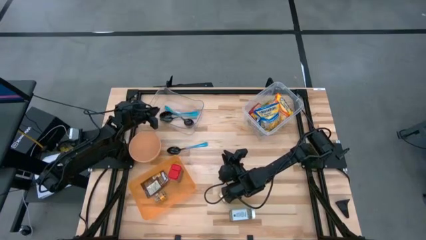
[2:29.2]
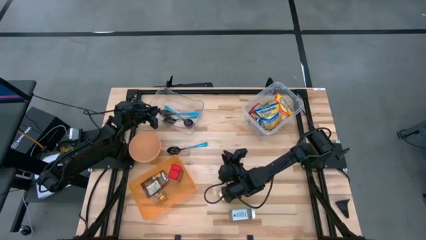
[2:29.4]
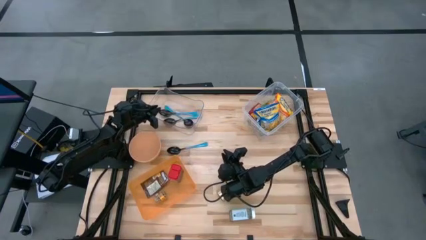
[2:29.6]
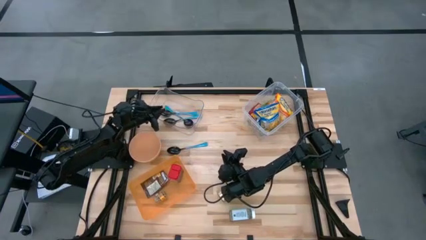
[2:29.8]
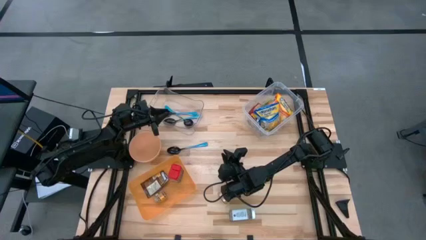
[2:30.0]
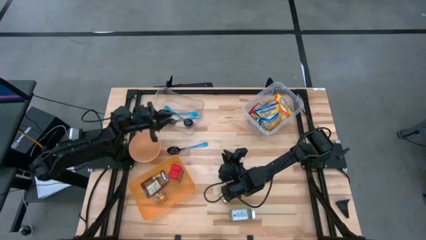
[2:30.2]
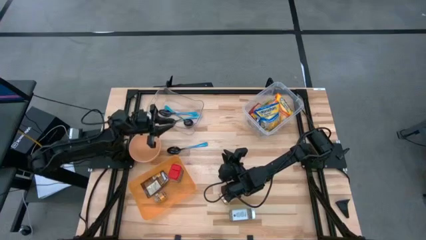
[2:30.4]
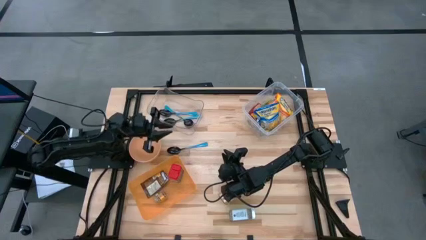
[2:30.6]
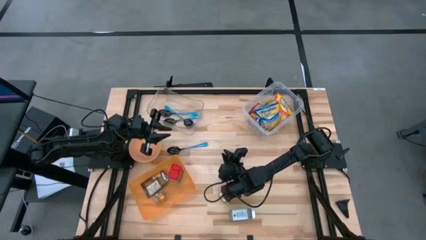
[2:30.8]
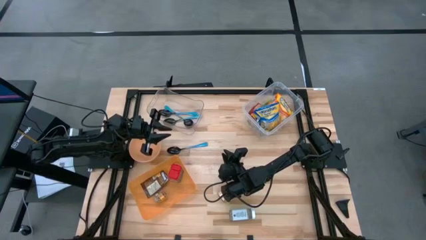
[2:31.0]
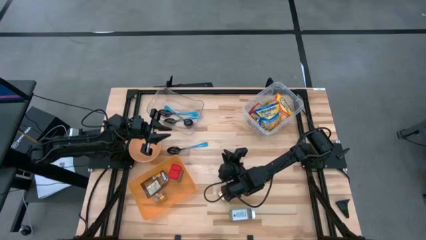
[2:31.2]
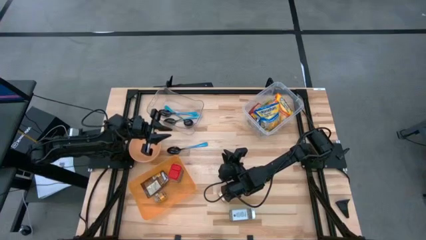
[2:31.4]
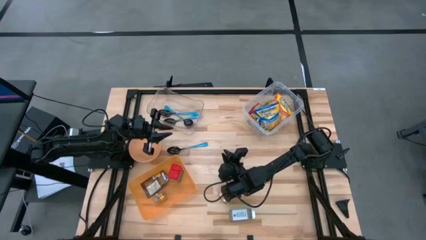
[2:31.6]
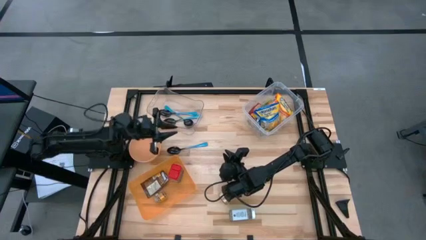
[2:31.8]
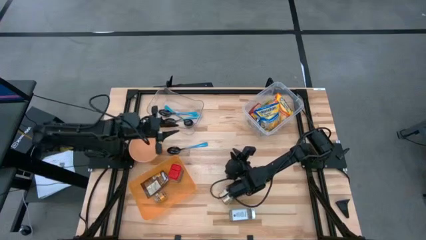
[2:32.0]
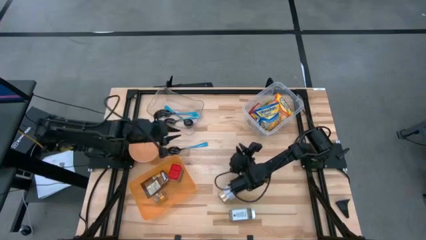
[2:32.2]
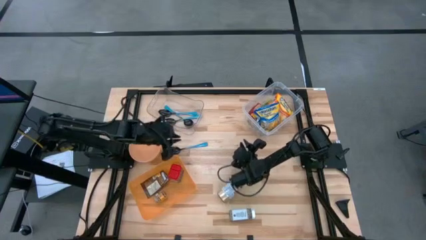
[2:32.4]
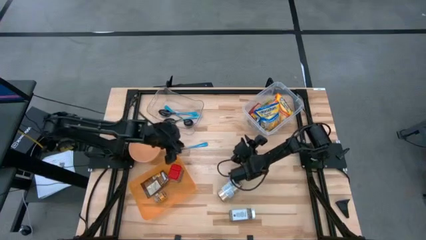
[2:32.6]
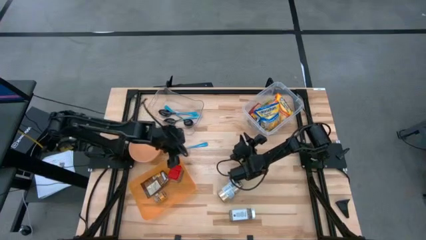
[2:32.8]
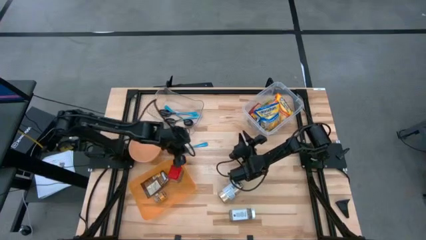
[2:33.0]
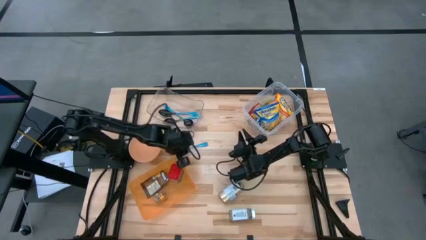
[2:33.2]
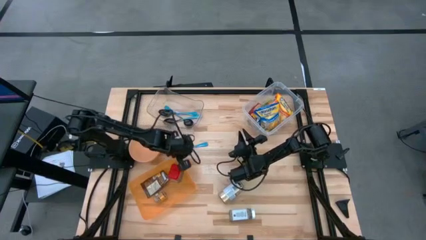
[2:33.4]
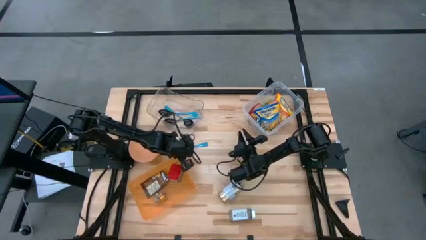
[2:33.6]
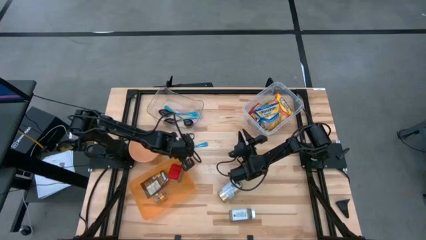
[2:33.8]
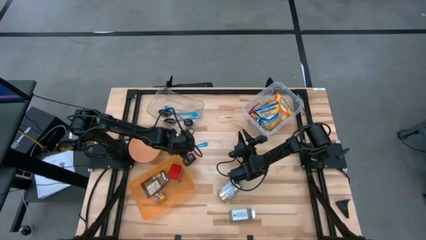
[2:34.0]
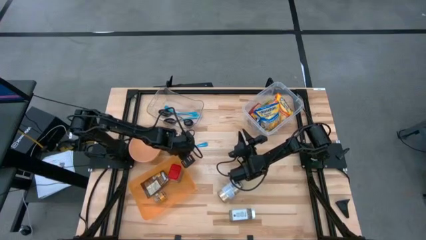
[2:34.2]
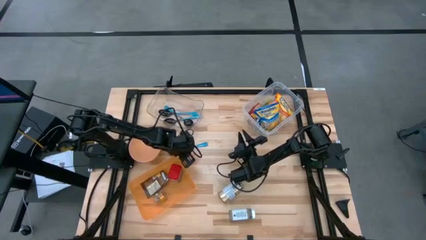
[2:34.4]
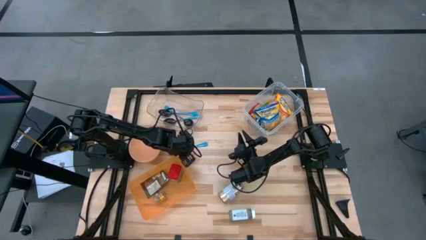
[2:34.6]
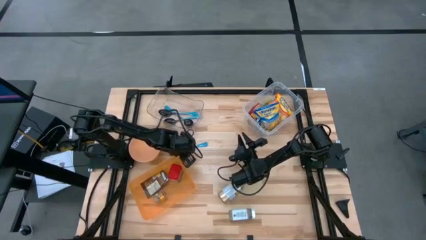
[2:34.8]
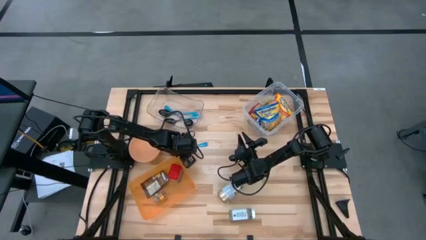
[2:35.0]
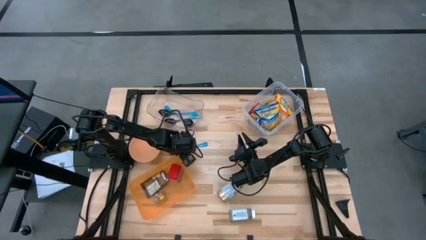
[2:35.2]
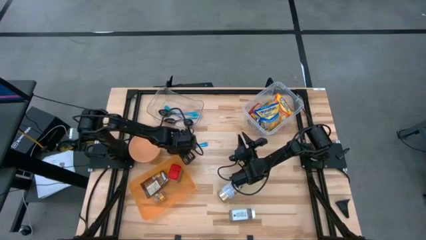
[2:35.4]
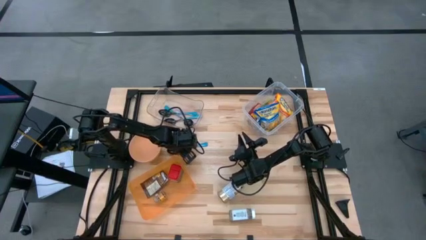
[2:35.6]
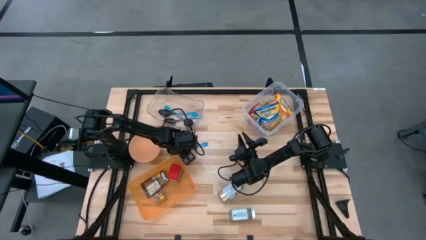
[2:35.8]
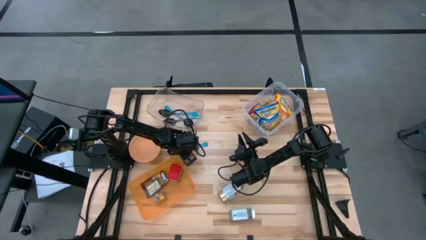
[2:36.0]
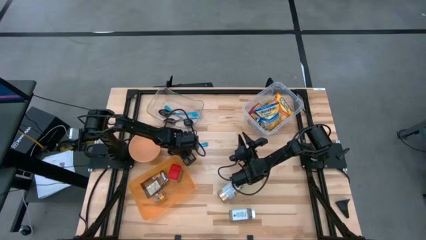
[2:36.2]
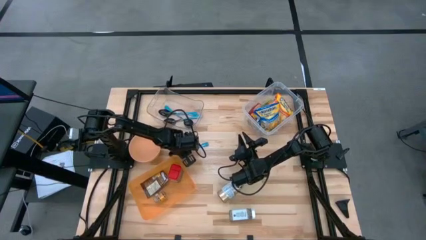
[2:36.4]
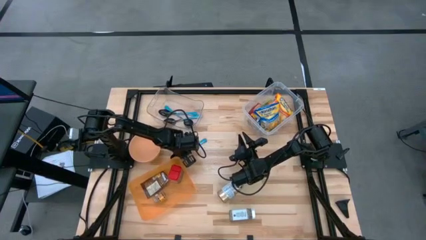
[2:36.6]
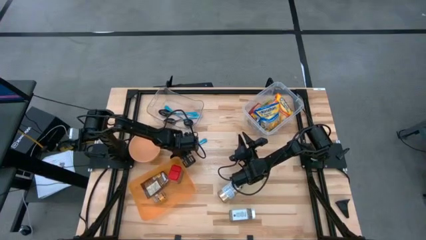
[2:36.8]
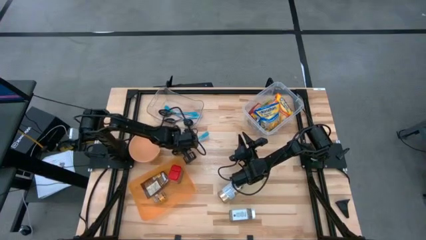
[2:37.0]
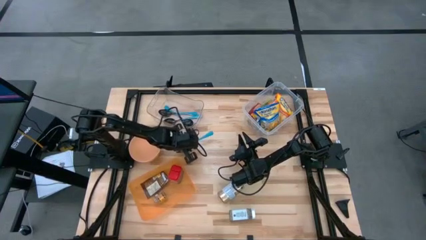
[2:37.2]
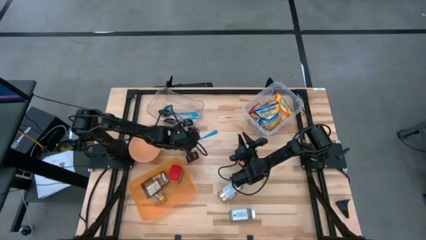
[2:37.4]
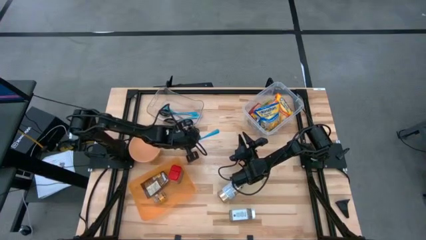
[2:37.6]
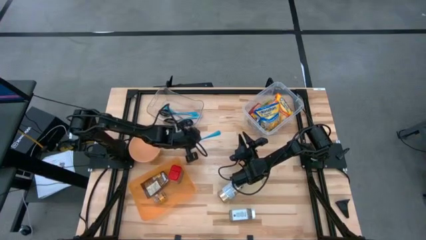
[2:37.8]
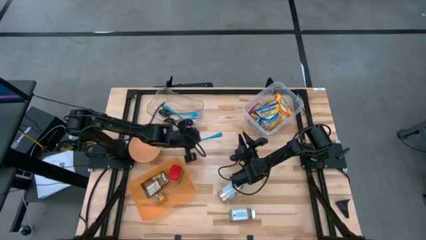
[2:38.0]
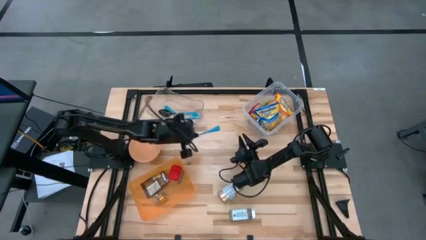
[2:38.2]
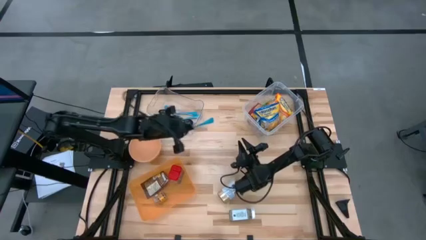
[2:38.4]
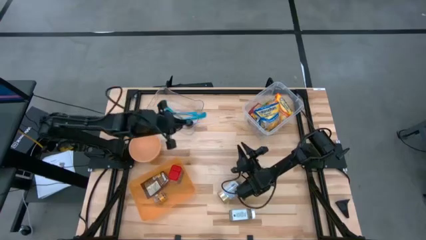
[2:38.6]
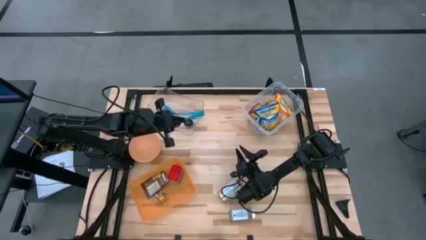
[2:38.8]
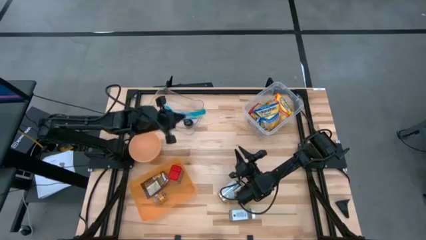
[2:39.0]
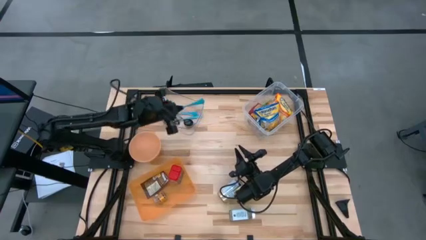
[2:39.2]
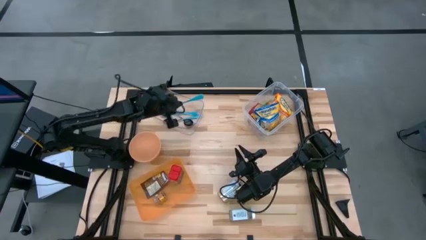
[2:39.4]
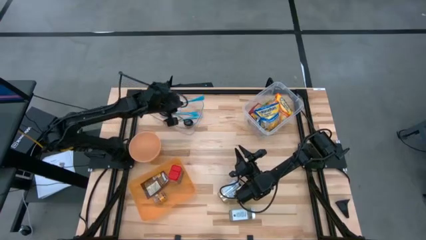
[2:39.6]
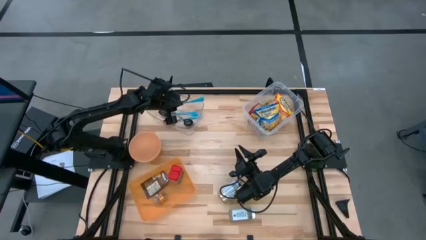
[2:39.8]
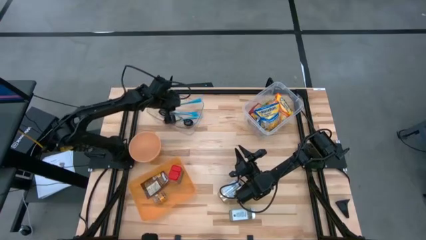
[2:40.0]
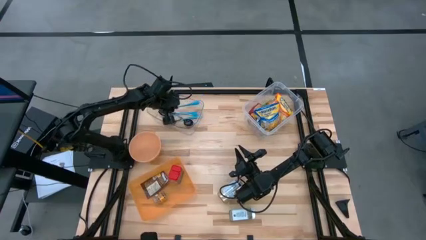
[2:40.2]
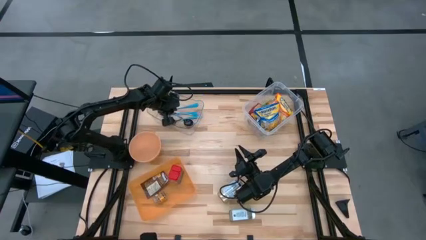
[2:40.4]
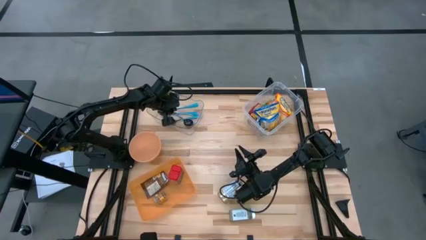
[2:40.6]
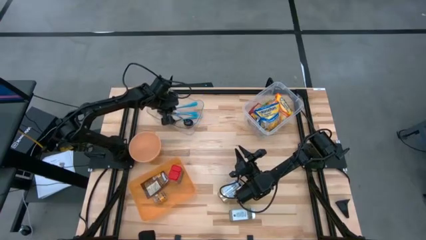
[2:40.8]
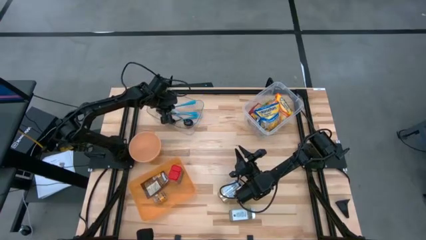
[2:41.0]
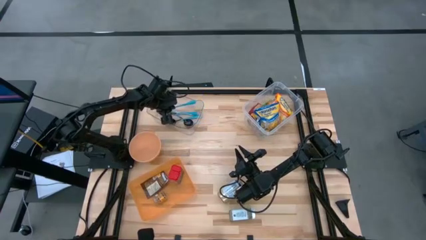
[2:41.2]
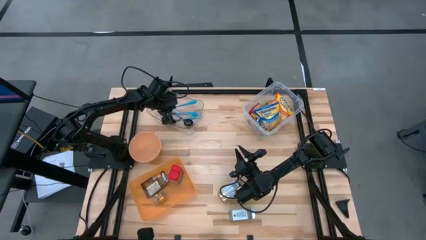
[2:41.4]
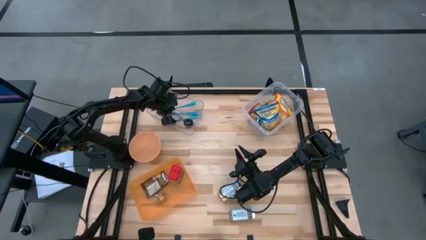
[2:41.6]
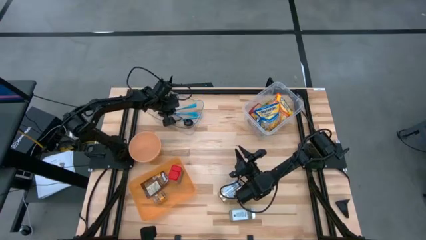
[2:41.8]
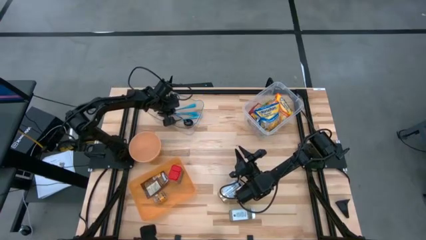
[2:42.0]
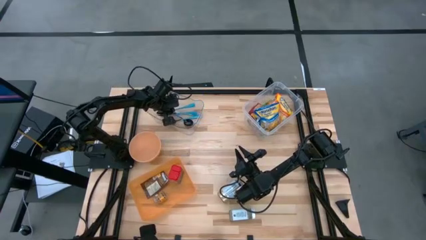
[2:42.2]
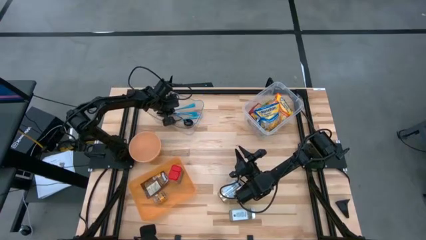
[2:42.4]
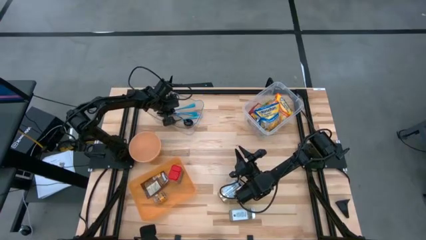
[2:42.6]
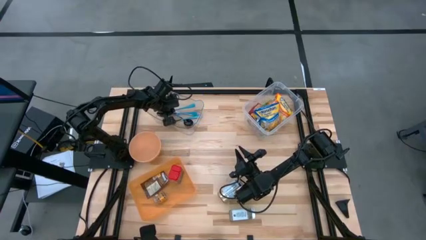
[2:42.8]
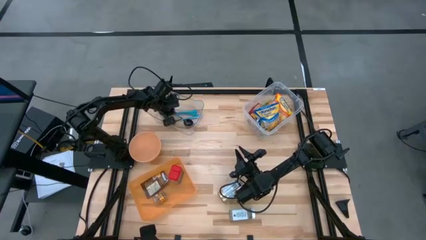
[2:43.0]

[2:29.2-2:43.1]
Task: Pick & Place Food Item
Put the blue spoon into the left transparent bin
